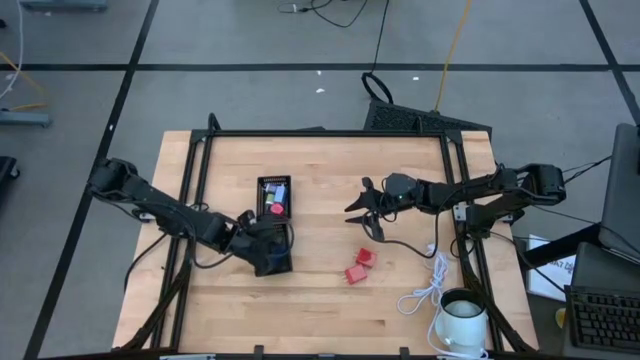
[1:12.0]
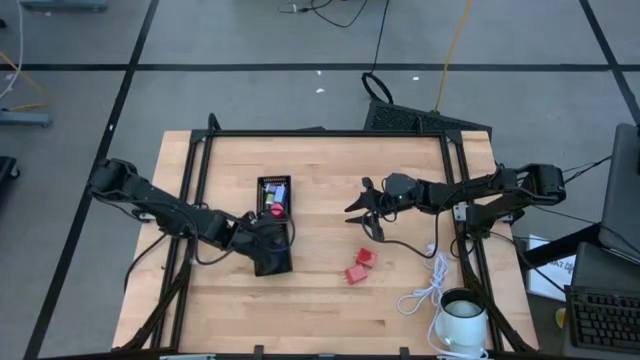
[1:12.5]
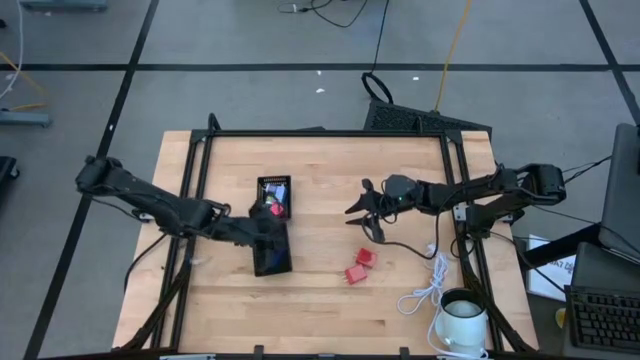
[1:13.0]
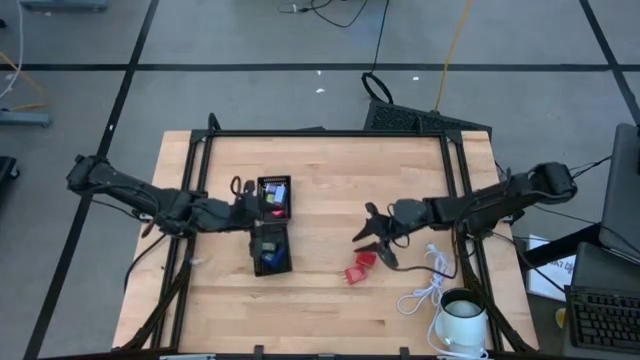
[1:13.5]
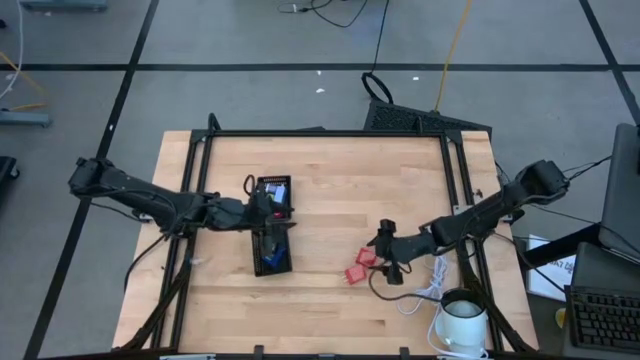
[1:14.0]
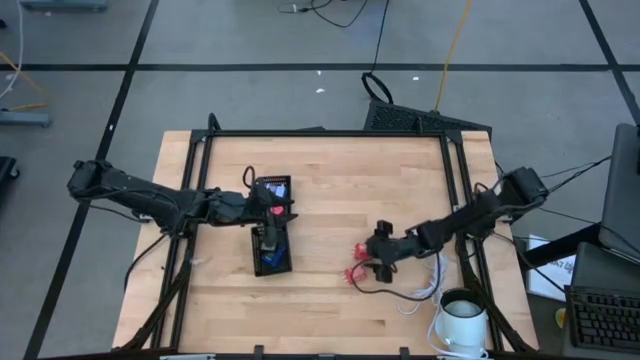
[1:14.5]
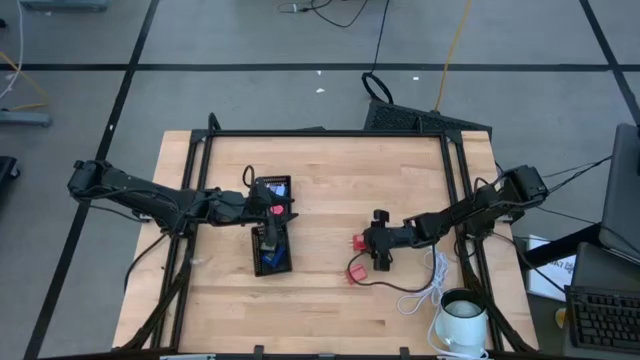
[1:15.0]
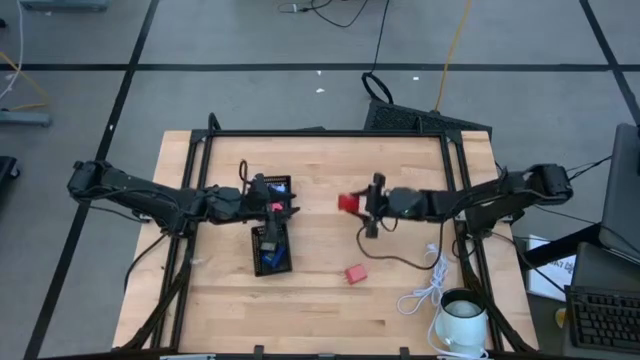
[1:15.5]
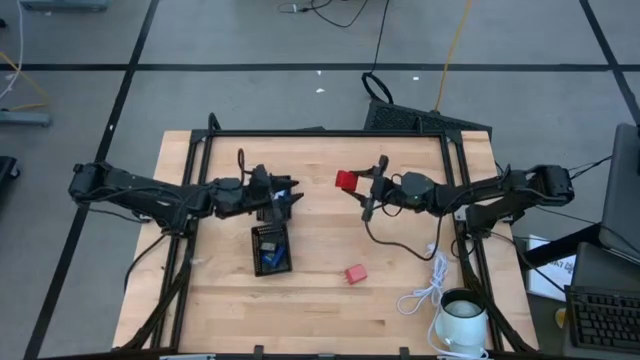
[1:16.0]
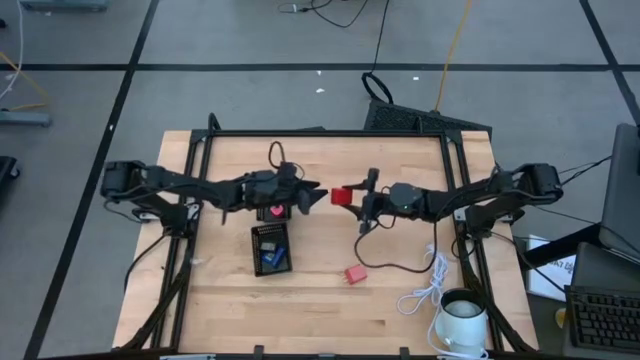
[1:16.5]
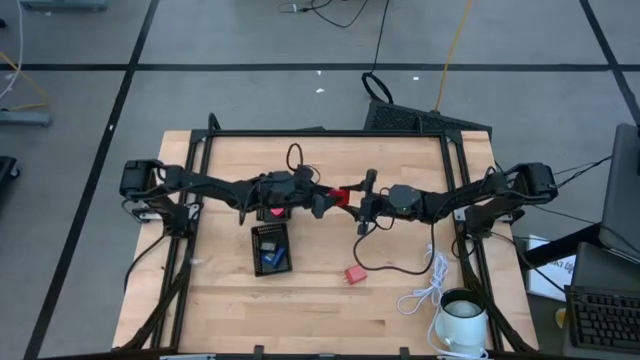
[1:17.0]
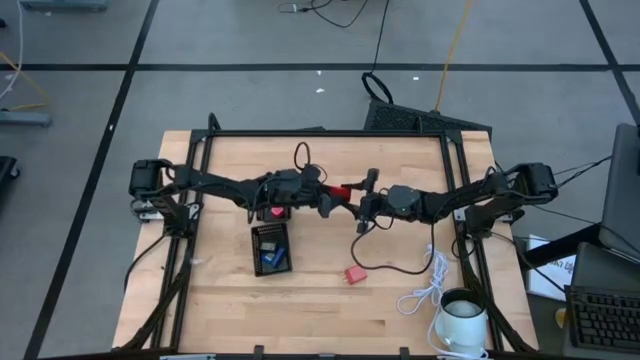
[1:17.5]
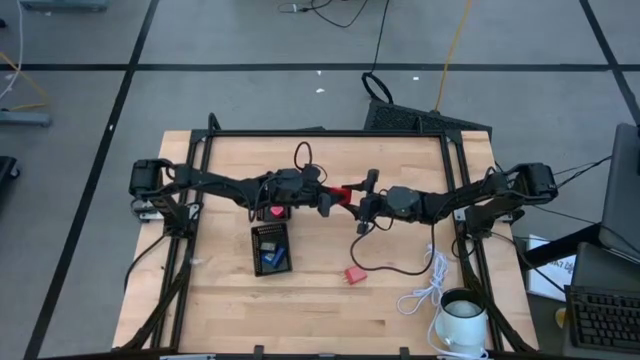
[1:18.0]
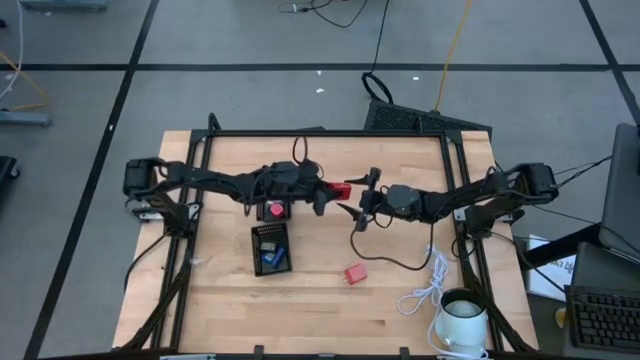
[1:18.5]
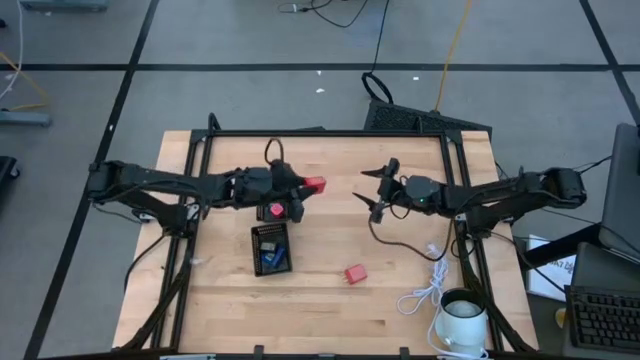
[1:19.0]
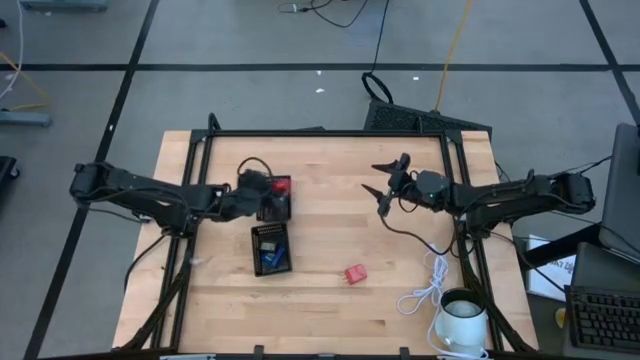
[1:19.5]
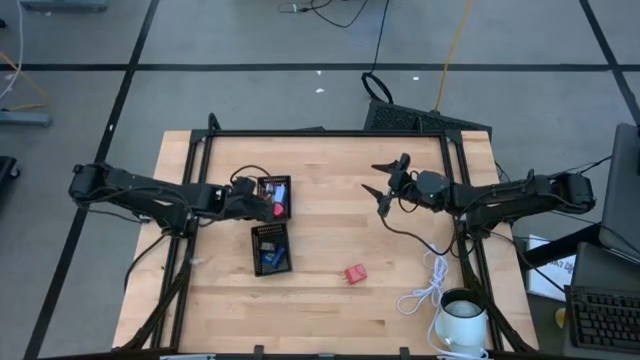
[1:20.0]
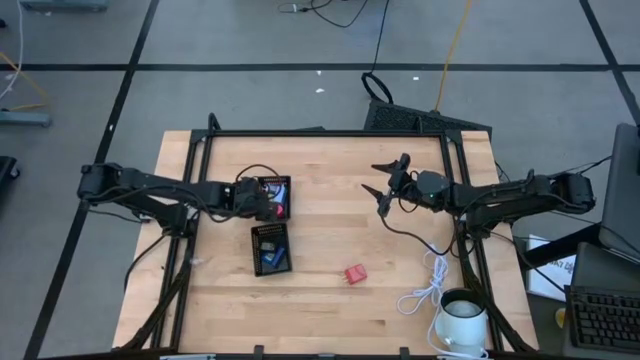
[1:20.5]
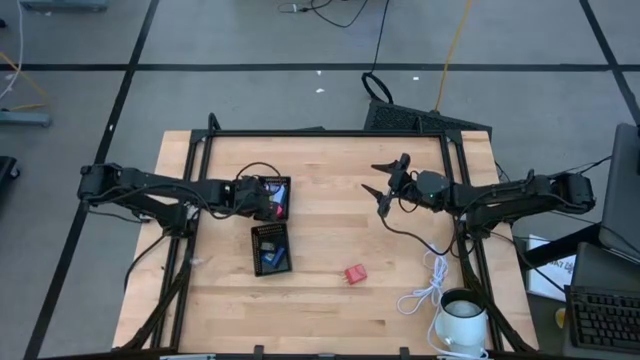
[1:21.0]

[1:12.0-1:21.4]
Task: Pick & Place Office items
Put the top red charger adapter into the top black bin

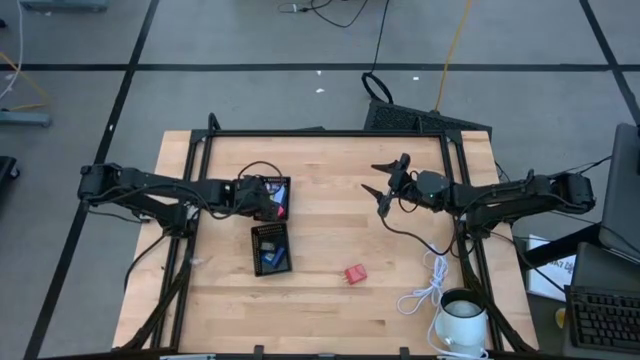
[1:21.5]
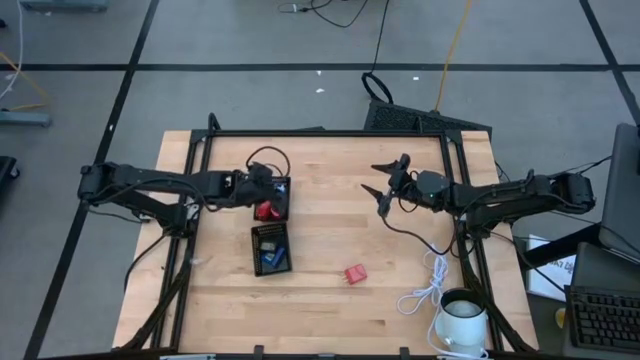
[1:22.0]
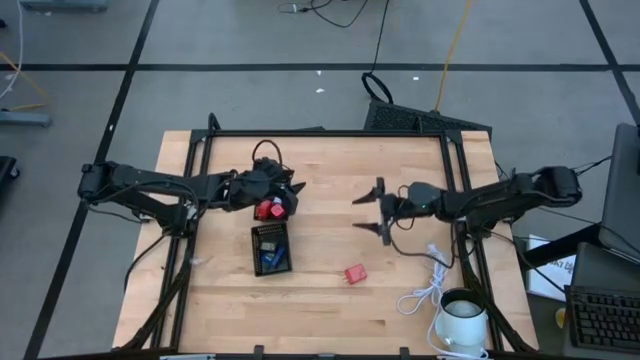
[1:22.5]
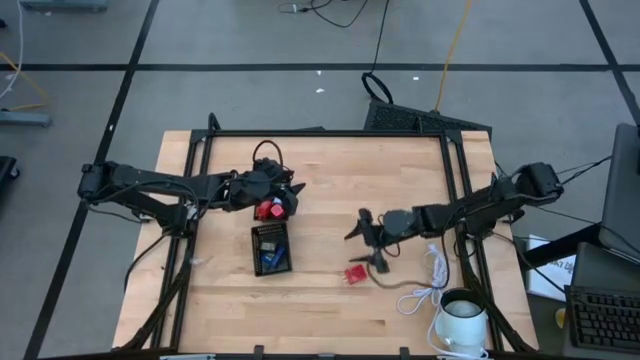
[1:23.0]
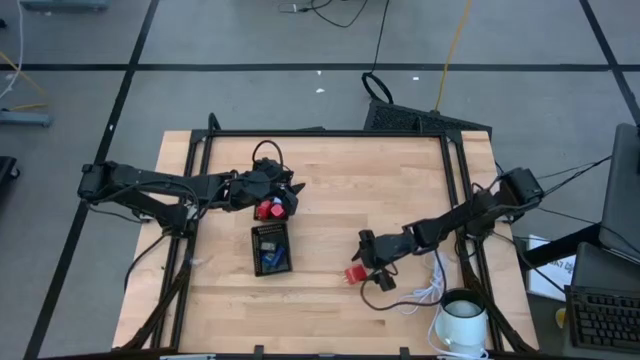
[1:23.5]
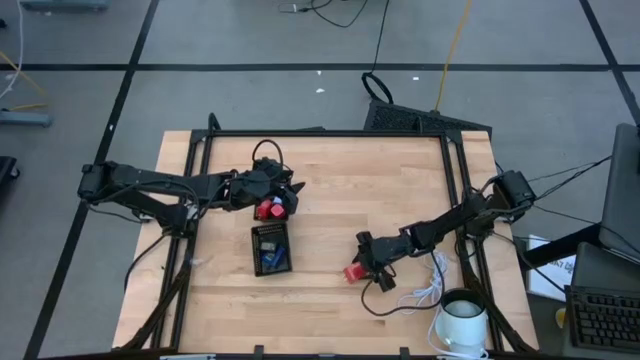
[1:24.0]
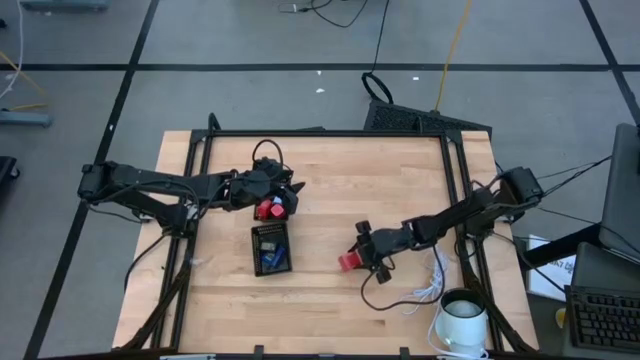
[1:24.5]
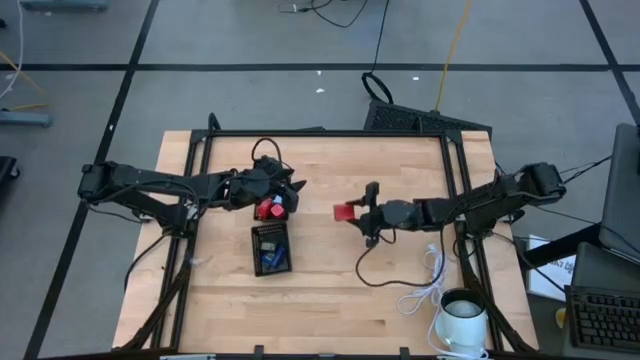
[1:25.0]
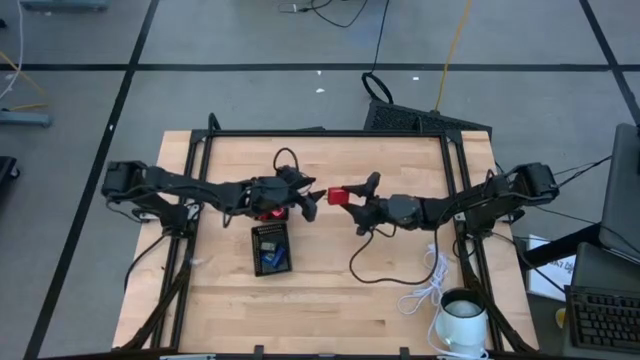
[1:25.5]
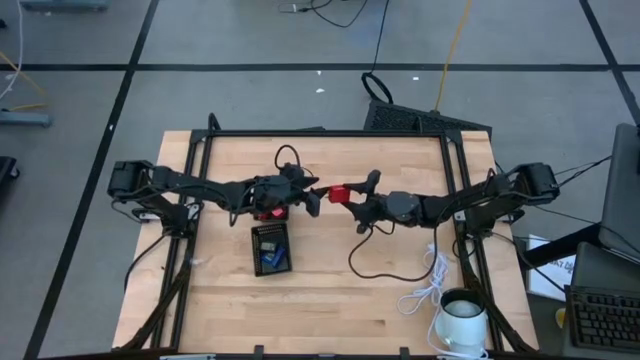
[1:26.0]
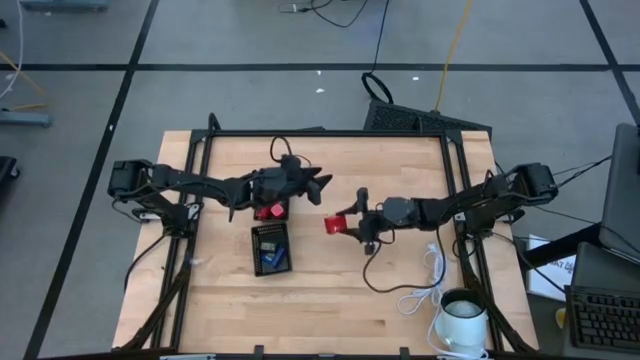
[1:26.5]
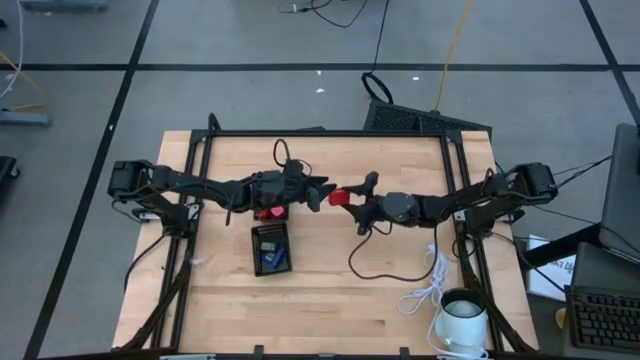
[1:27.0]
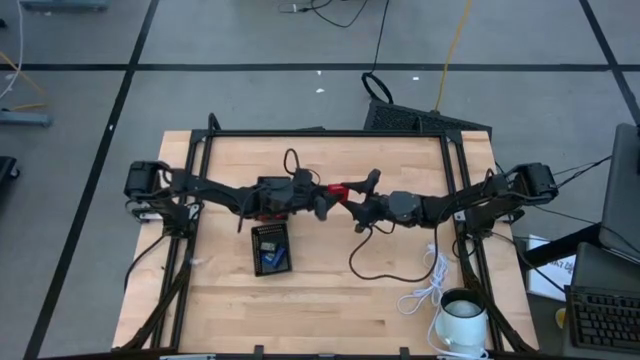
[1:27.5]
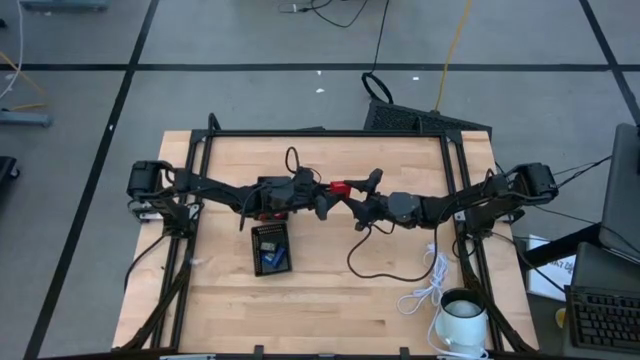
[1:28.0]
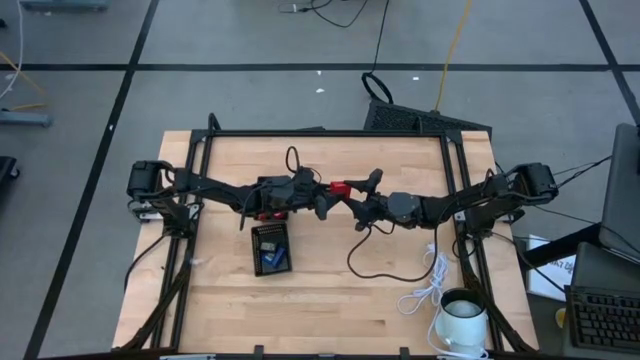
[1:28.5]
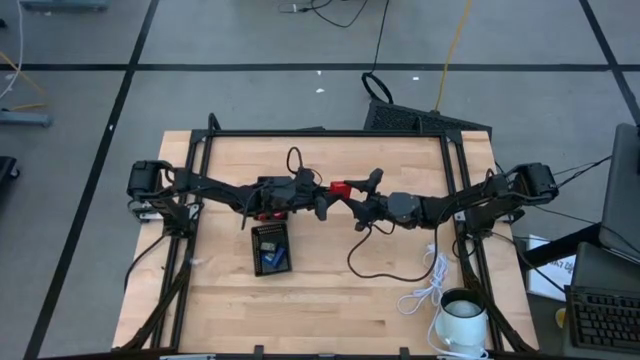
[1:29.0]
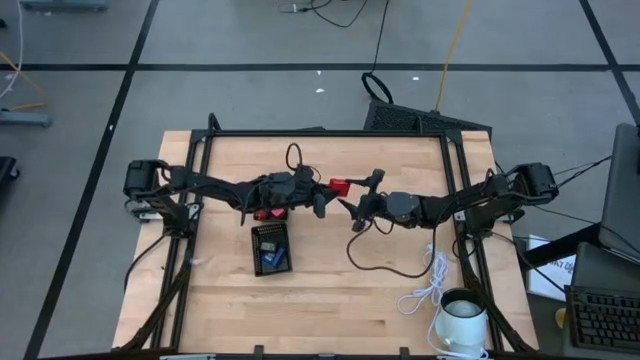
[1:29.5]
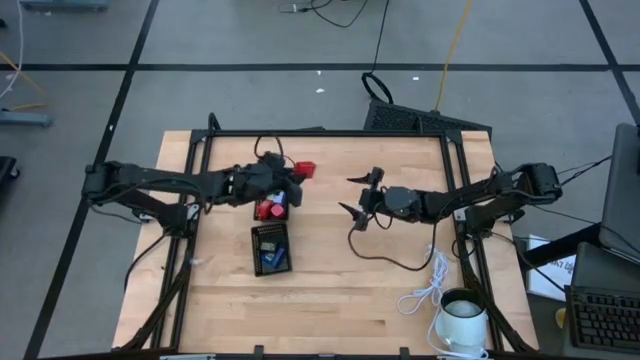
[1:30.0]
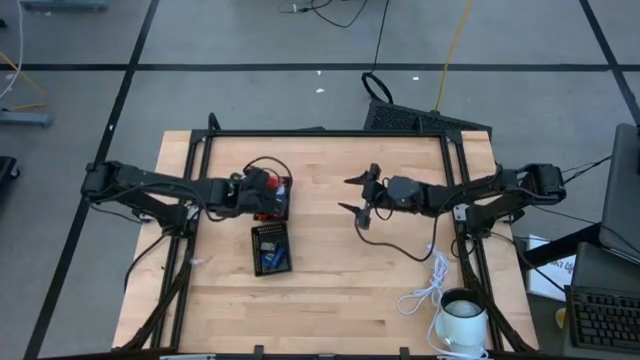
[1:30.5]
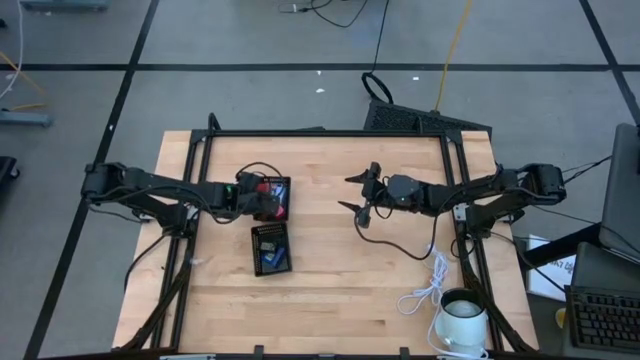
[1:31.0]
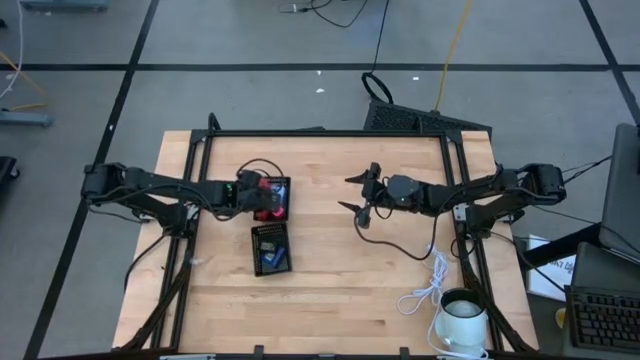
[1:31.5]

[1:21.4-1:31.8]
Put the red charger adapter into the top black bin

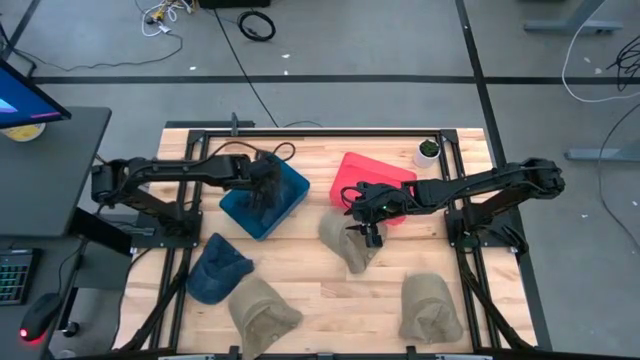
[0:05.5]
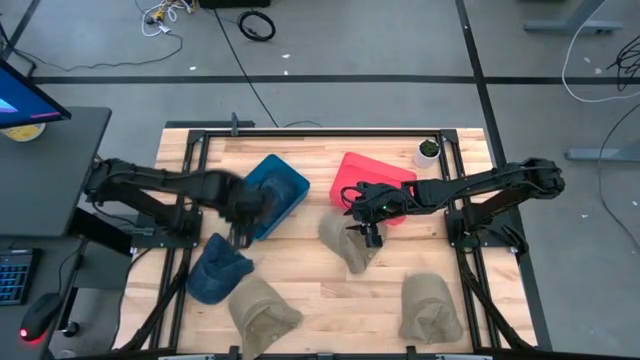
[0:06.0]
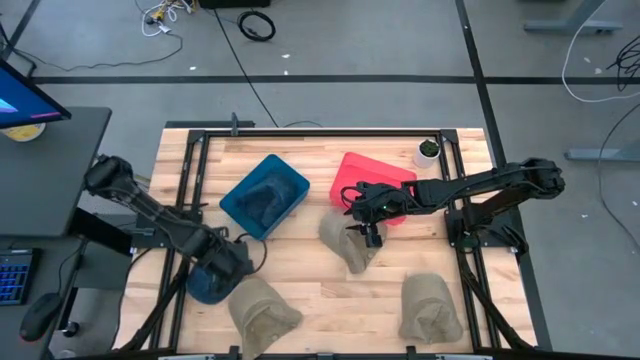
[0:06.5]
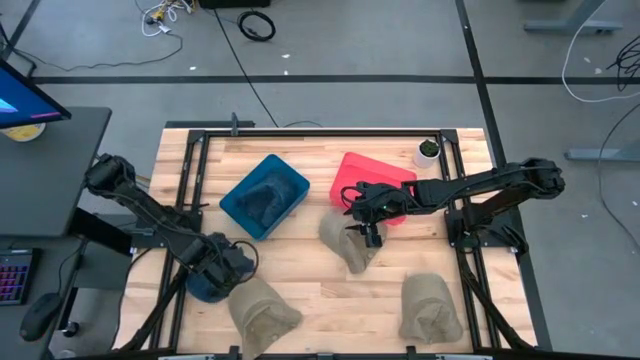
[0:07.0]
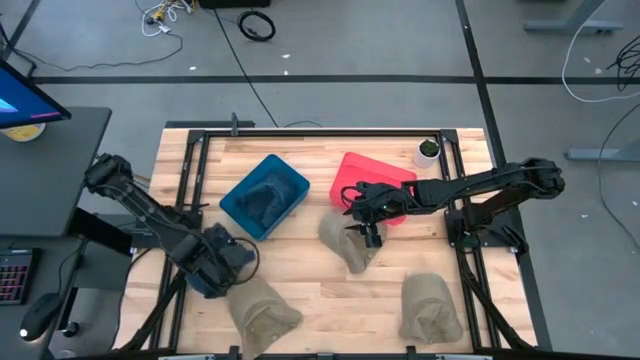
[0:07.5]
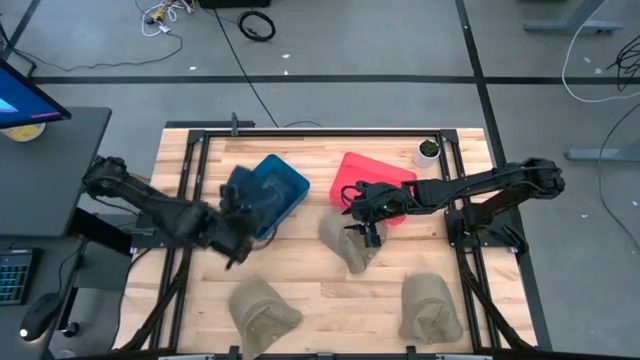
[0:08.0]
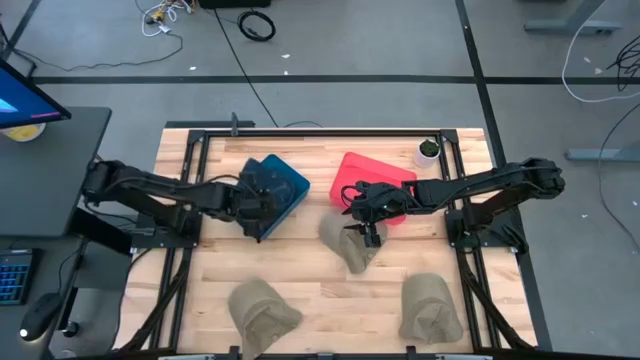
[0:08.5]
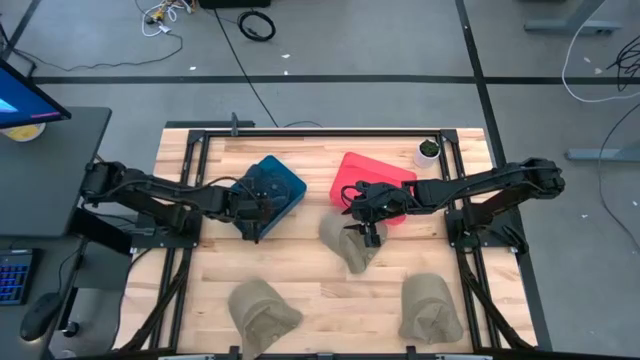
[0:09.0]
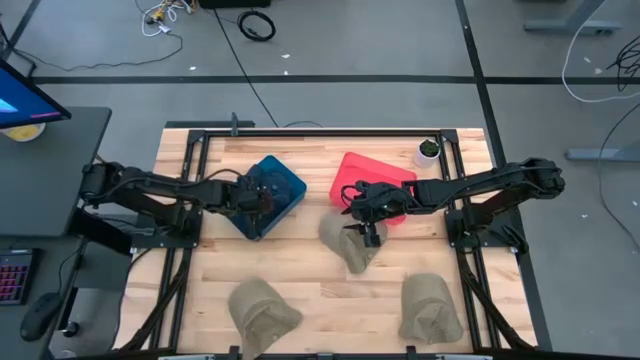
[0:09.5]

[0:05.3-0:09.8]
Task: Pick & Place hat
Put the blue cap into the blue bin
